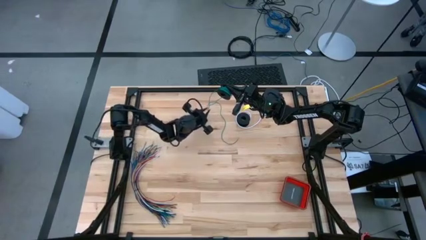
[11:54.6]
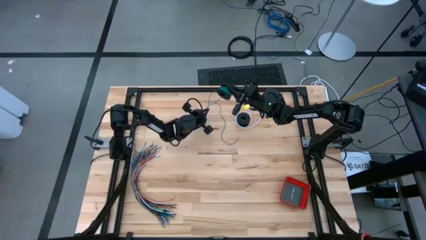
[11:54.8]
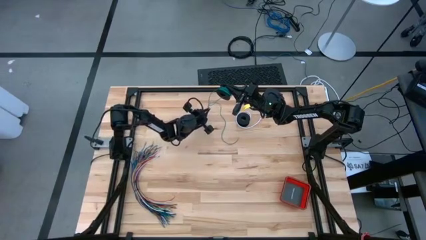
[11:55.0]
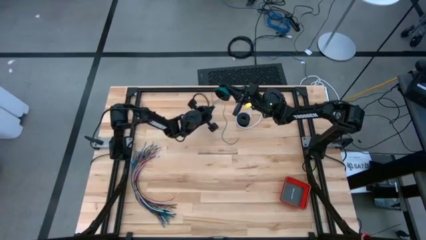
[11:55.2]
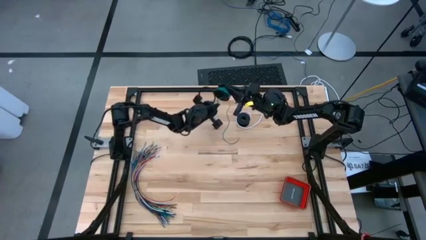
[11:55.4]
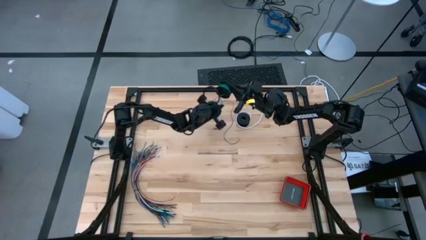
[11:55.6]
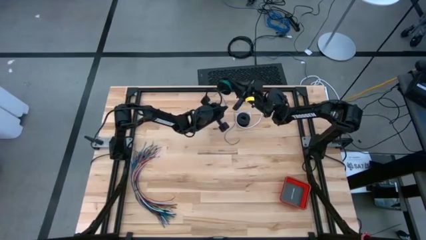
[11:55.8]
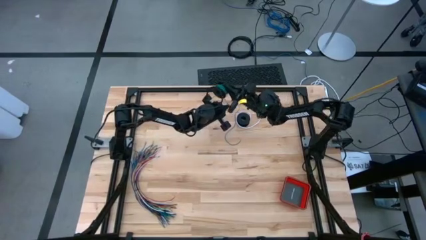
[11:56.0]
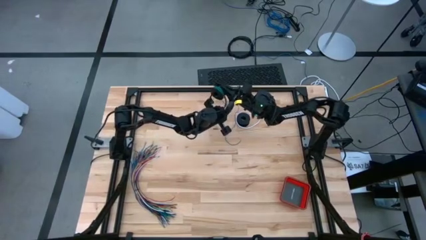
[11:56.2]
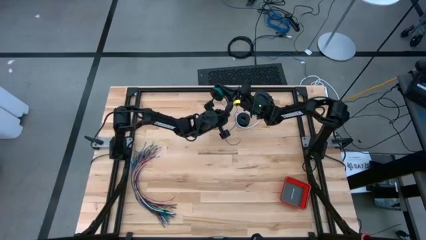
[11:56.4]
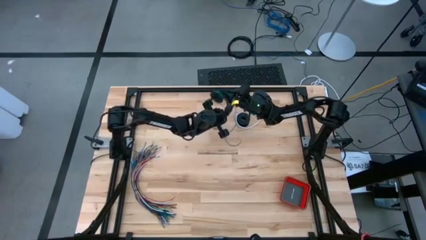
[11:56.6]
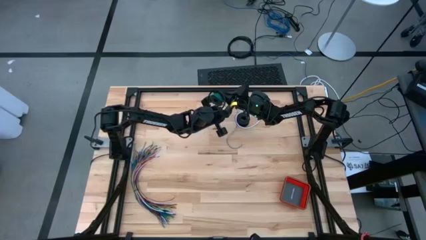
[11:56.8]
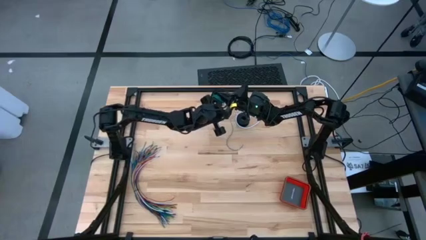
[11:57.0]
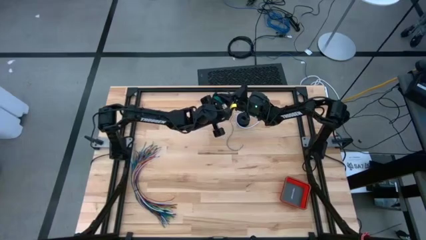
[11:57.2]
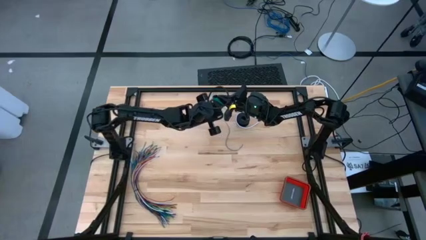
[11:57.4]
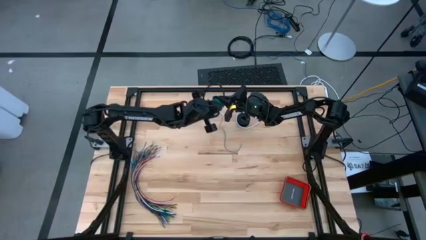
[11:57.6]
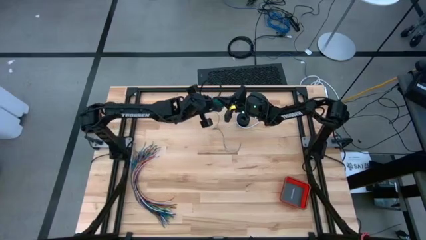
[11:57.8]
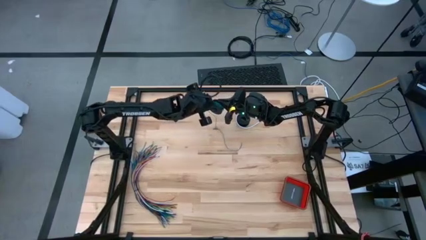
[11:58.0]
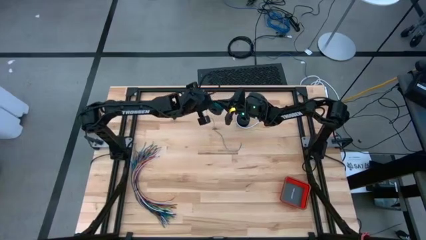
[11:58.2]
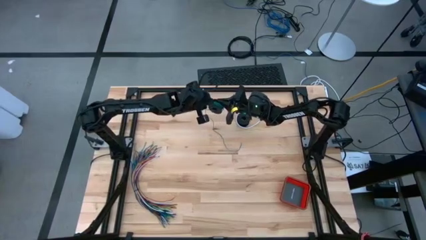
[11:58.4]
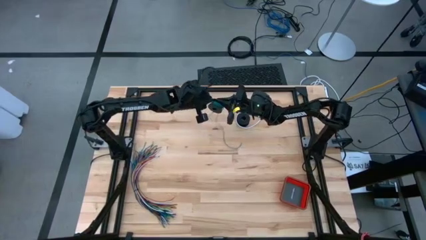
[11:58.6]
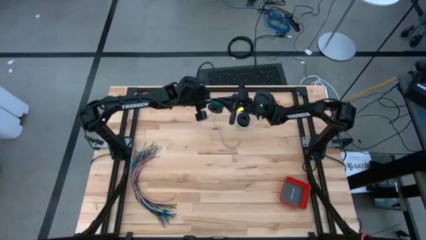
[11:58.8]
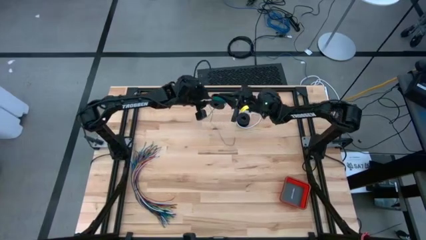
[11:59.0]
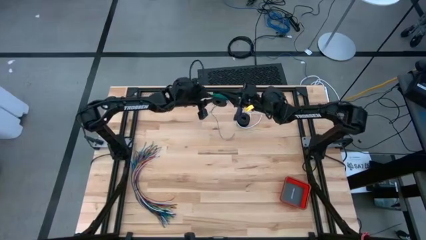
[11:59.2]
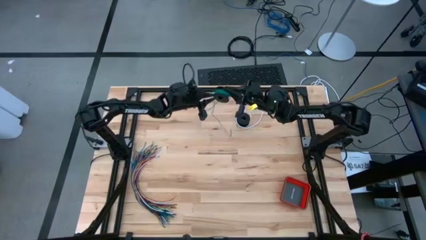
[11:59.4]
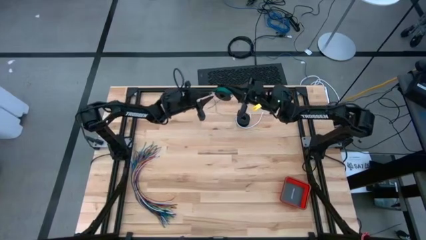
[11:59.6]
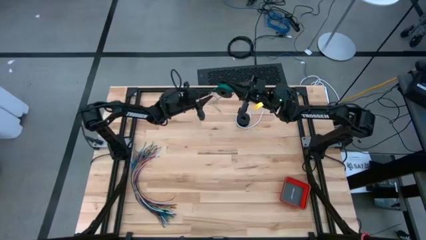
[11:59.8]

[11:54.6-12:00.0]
Task: Coil cords
Coil the green wire onto the spool

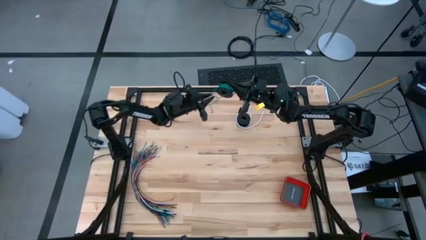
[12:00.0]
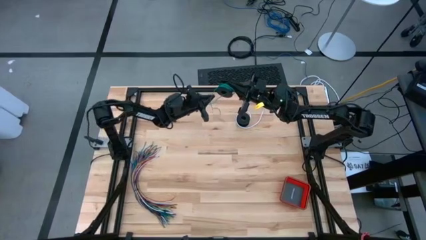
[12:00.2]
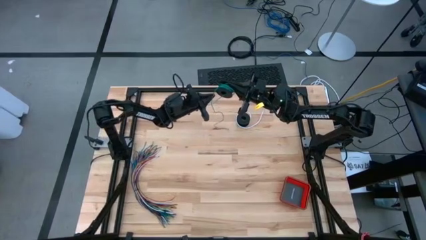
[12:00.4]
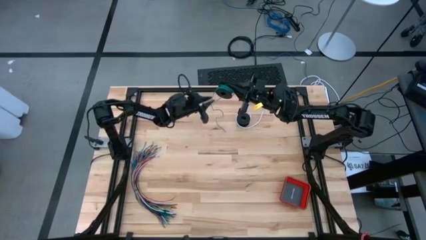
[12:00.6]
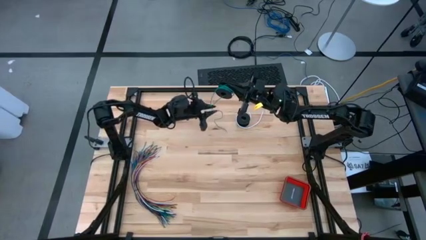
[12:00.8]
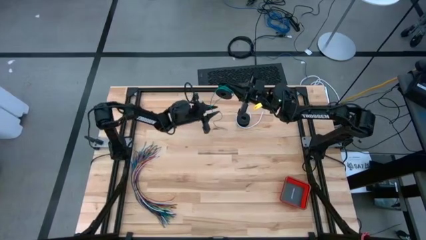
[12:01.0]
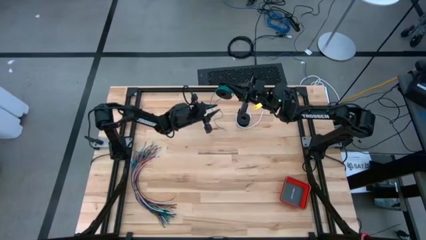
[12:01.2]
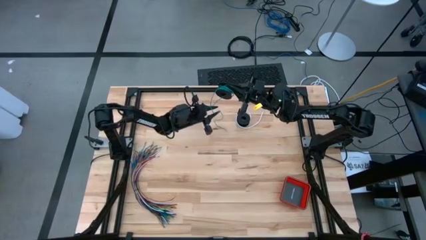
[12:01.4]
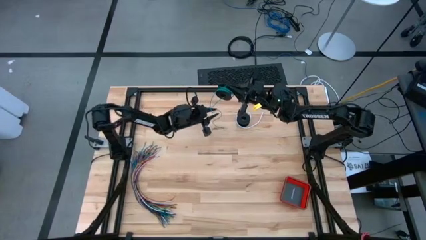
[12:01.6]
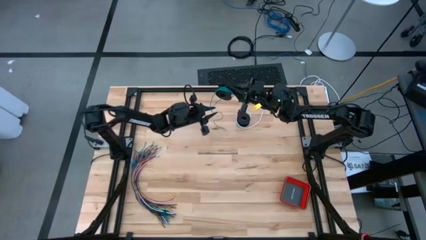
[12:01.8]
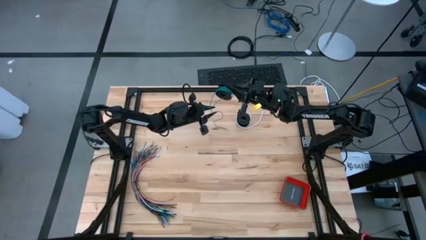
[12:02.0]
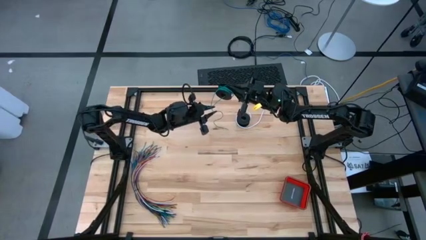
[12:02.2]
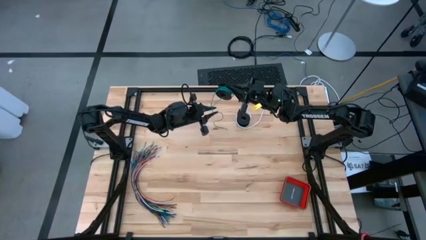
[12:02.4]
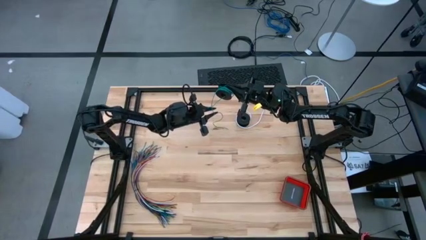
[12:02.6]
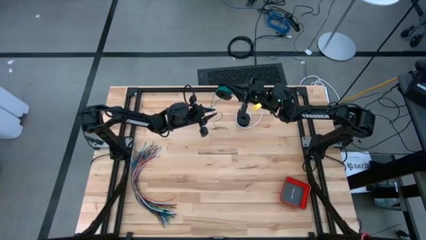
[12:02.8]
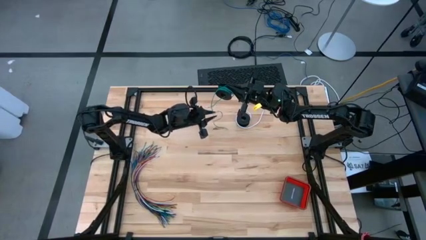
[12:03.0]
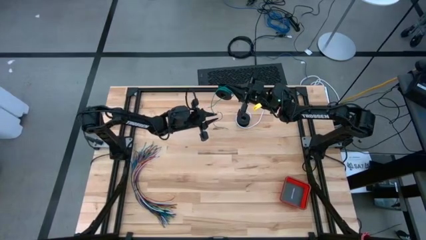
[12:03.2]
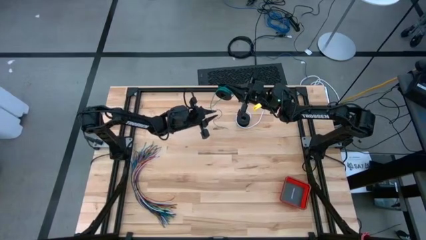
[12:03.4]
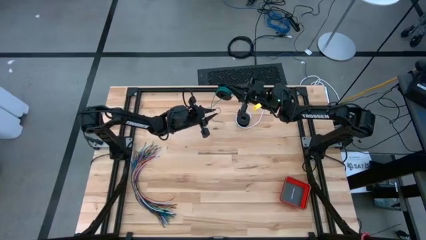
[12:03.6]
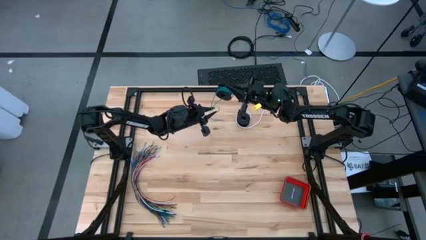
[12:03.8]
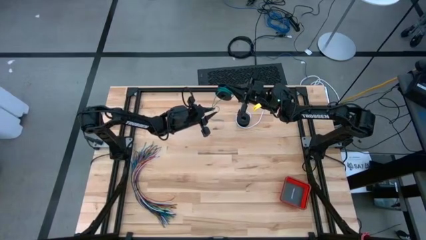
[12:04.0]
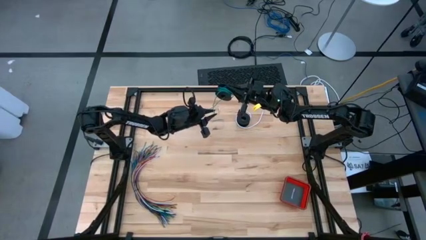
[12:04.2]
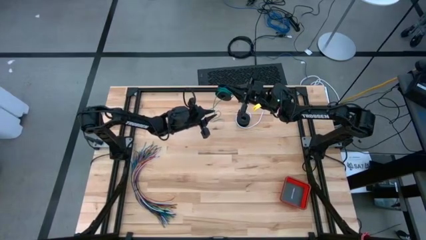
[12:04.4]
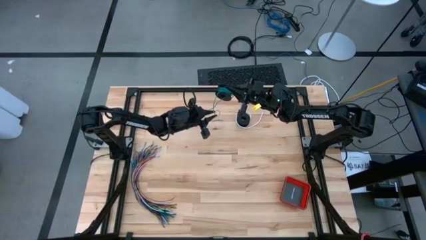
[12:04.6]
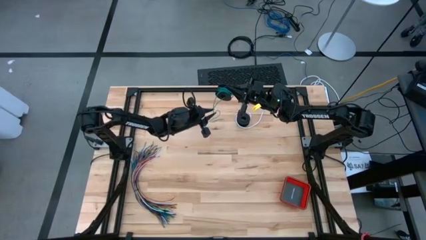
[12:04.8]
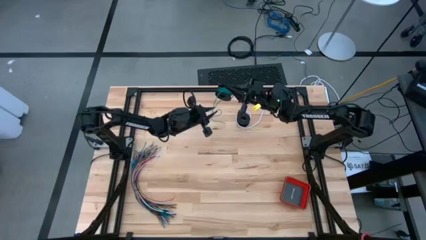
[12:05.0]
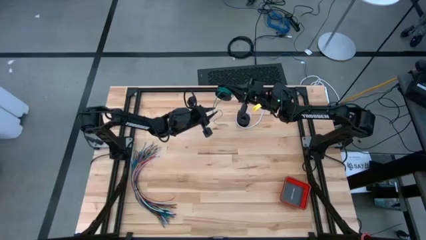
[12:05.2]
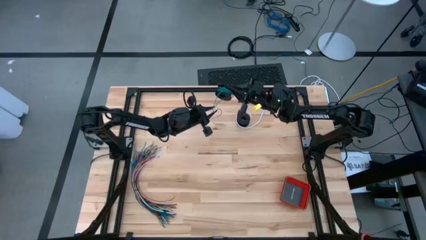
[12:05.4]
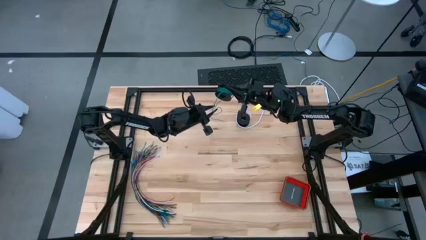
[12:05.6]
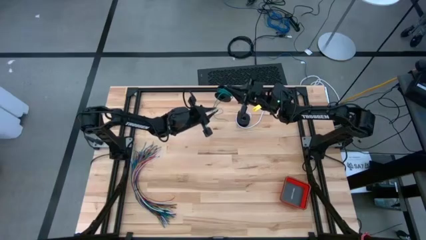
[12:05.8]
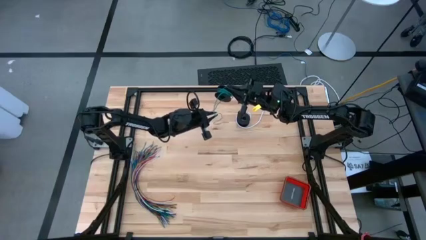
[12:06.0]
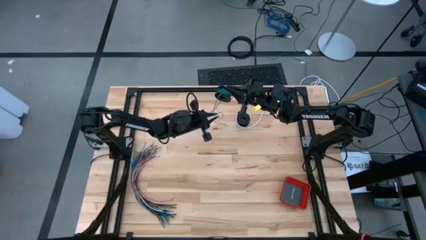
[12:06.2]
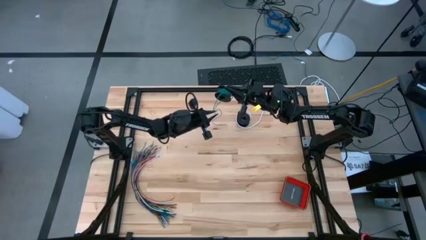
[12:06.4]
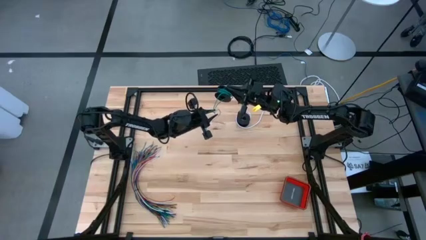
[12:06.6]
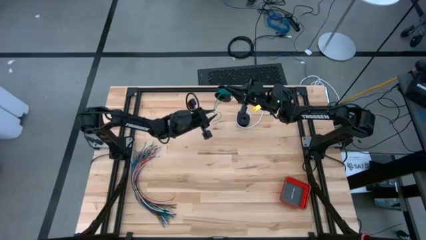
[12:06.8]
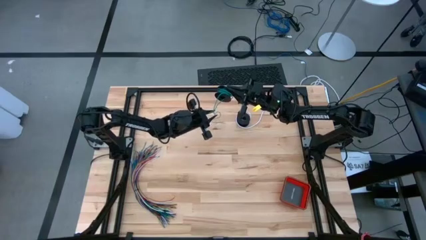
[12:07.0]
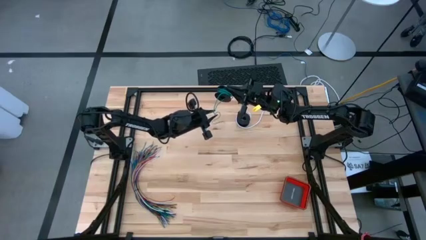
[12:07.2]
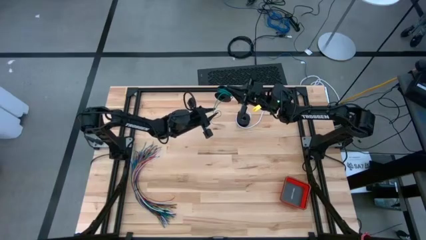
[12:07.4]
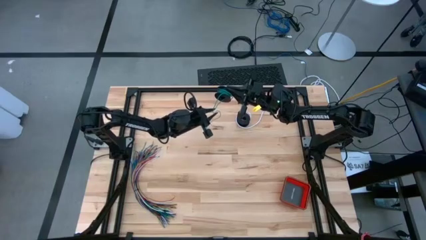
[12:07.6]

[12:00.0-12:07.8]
Coil the green wire onto the spool

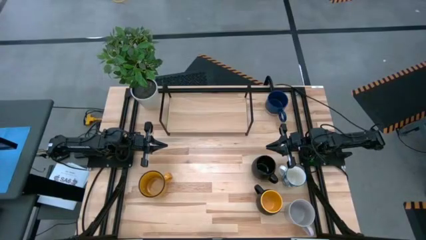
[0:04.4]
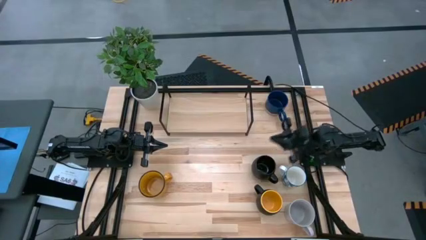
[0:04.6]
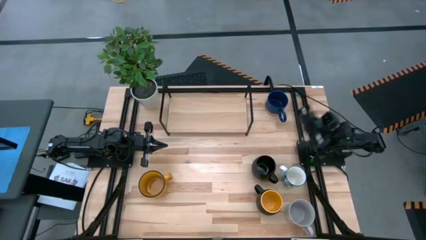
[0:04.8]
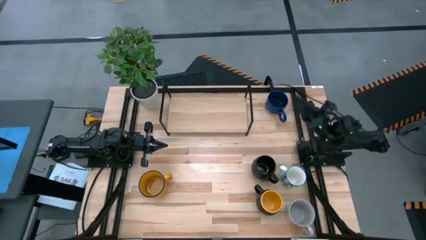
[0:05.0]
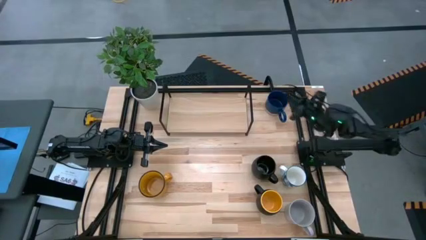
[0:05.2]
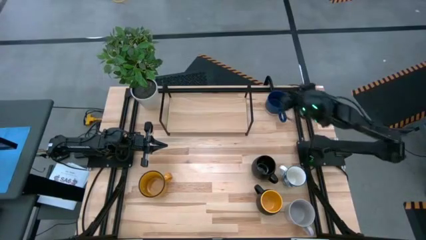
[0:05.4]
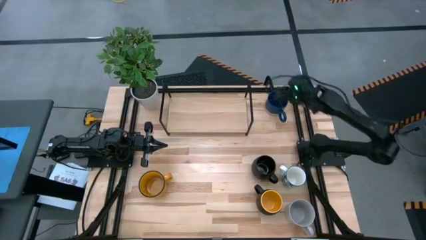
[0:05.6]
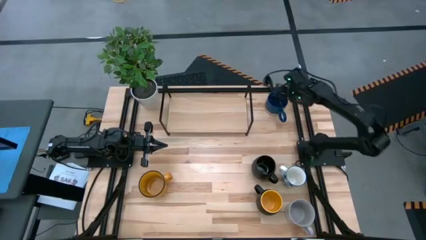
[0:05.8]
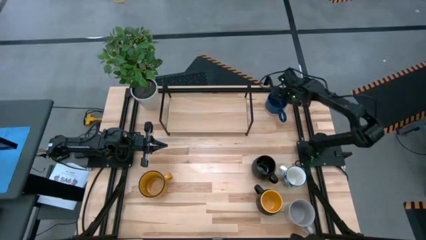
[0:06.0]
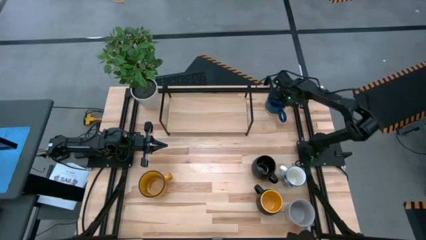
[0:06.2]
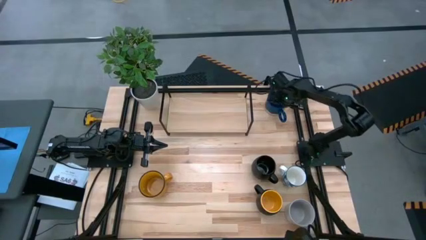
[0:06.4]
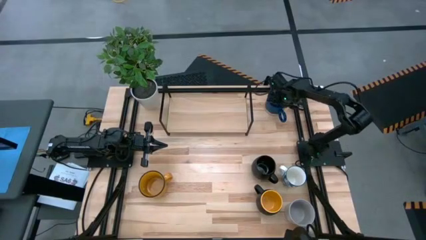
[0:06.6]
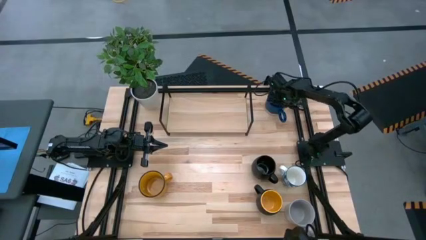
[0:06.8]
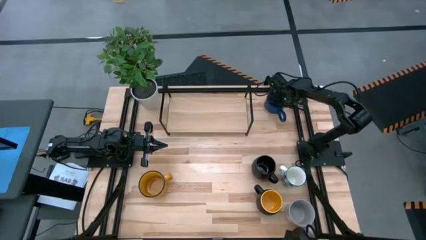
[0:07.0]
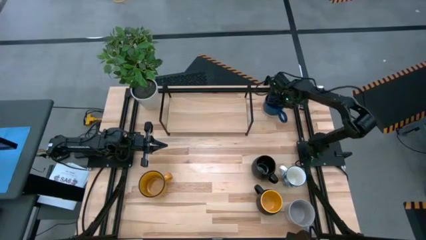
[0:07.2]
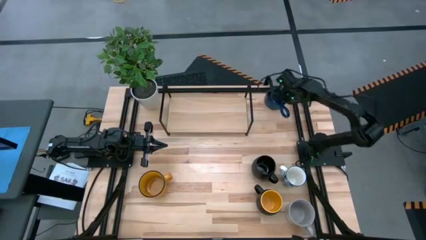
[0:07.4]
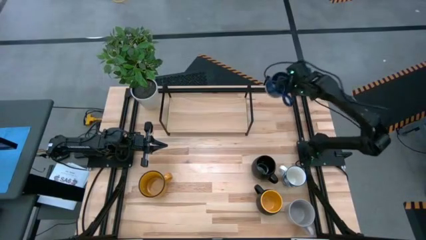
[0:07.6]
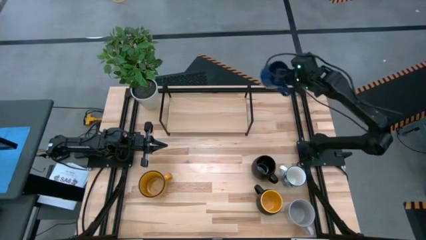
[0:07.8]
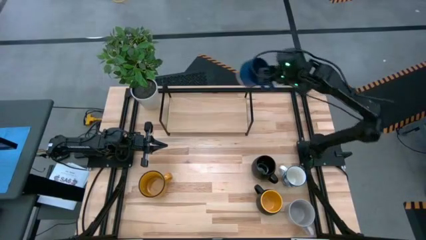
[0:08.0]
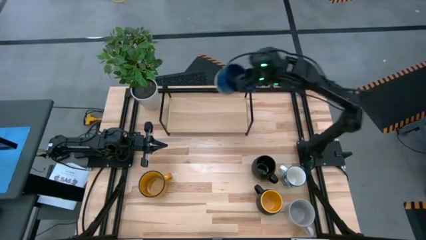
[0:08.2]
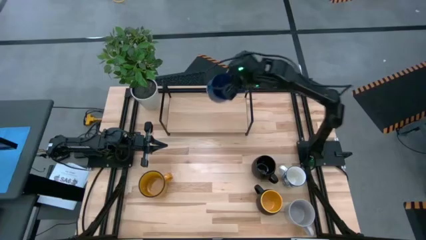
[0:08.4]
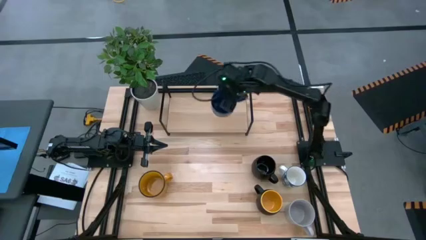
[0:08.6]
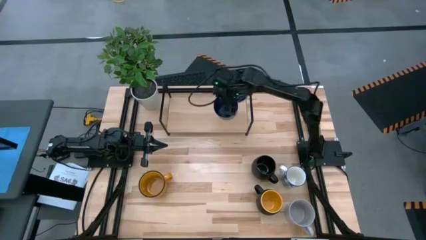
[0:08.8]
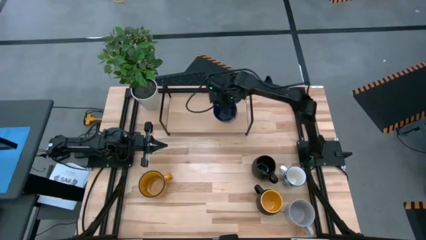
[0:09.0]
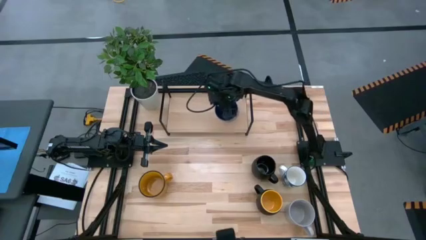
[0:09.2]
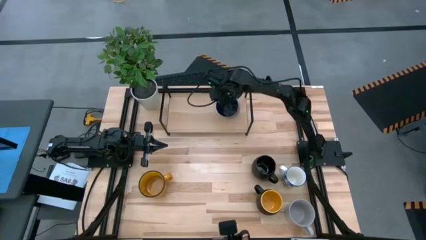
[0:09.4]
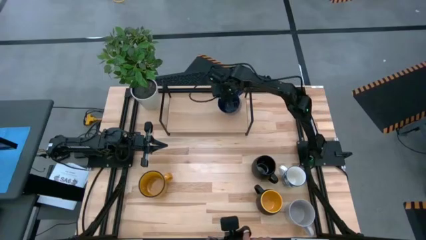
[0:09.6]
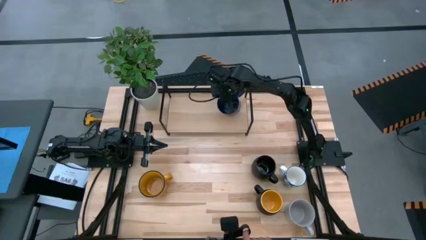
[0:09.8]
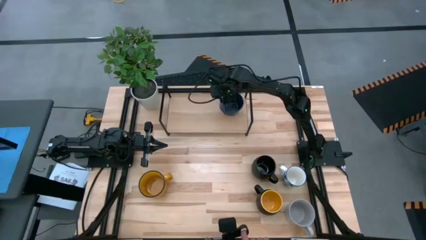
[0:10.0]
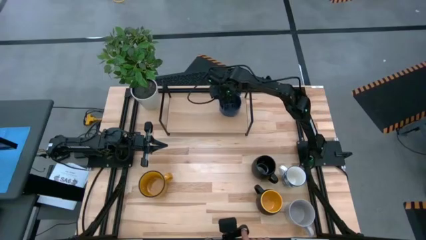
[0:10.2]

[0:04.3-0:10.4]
Task: Place coffee mugs
Put the blue mug on the shelf
